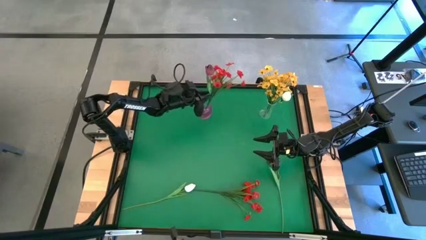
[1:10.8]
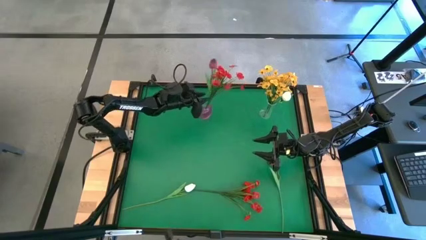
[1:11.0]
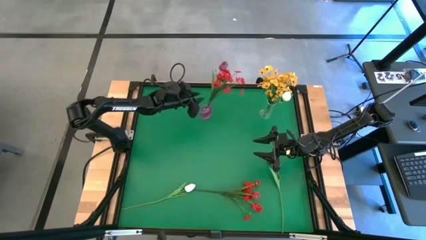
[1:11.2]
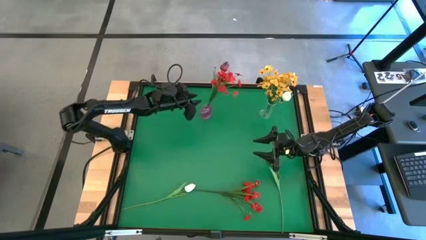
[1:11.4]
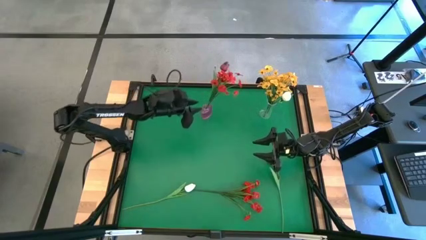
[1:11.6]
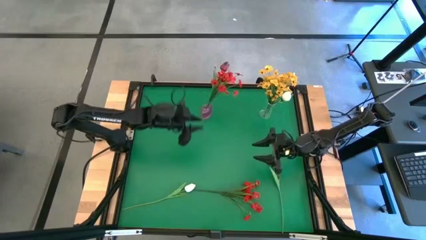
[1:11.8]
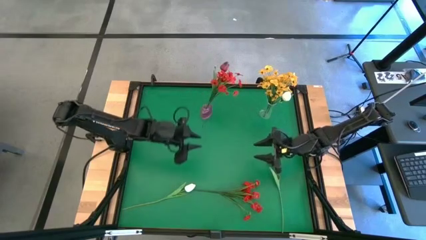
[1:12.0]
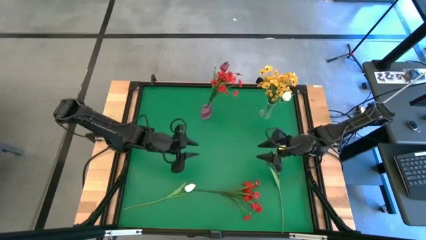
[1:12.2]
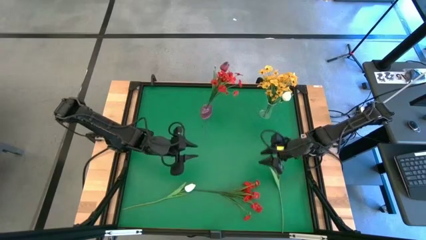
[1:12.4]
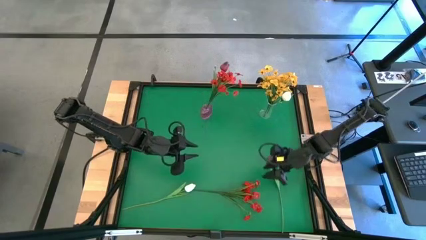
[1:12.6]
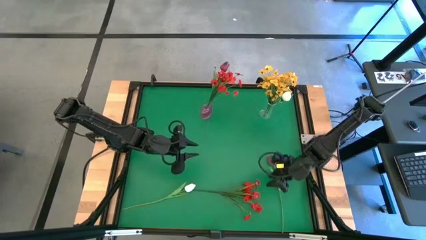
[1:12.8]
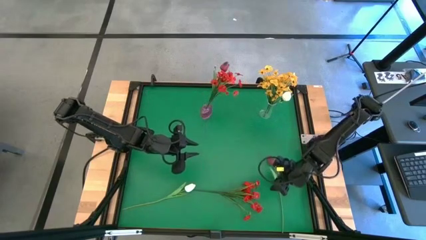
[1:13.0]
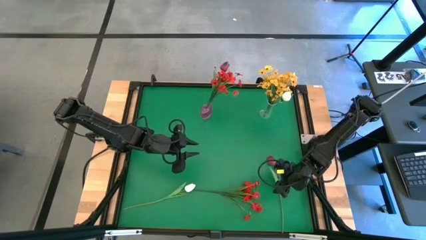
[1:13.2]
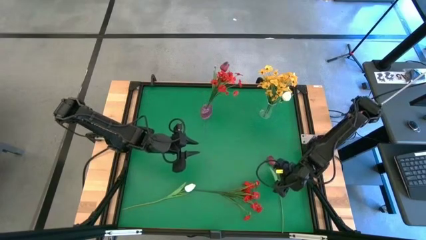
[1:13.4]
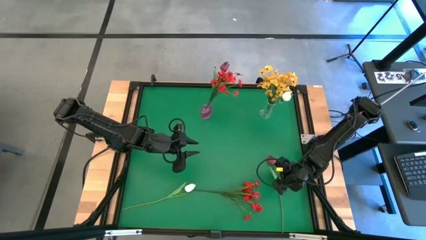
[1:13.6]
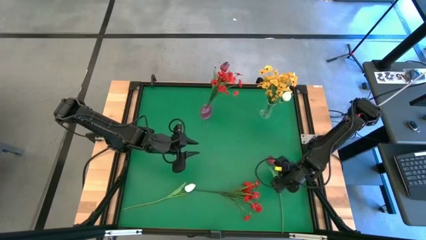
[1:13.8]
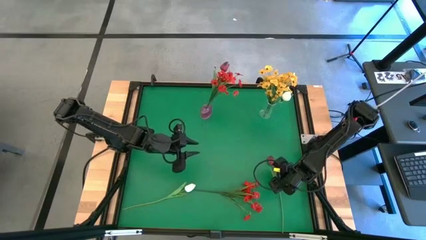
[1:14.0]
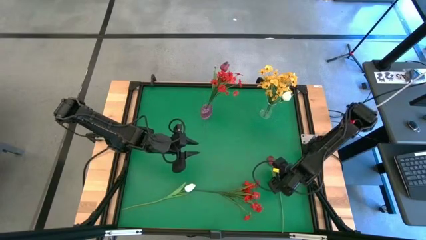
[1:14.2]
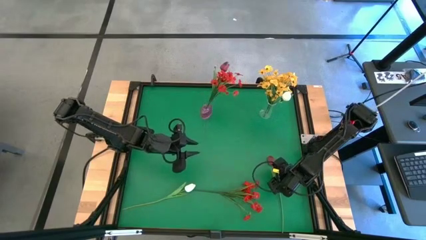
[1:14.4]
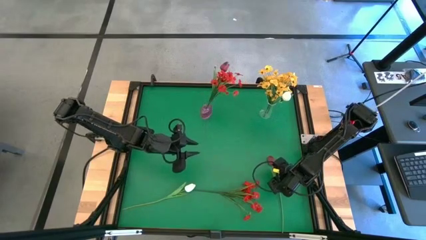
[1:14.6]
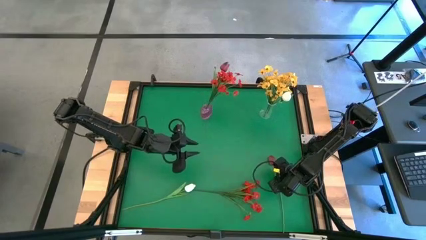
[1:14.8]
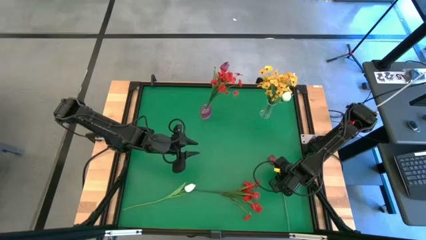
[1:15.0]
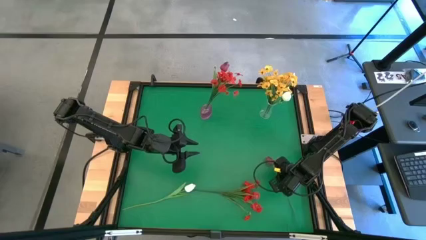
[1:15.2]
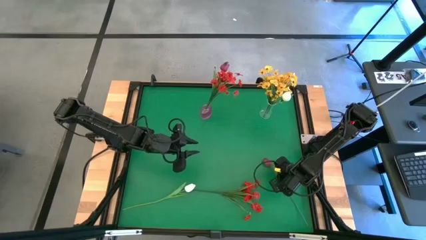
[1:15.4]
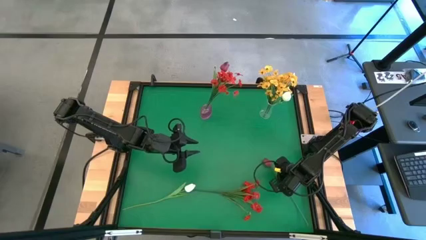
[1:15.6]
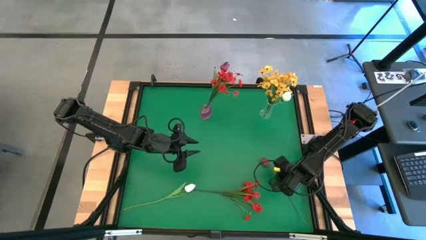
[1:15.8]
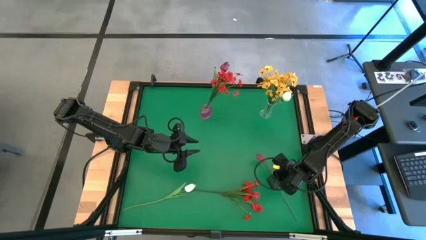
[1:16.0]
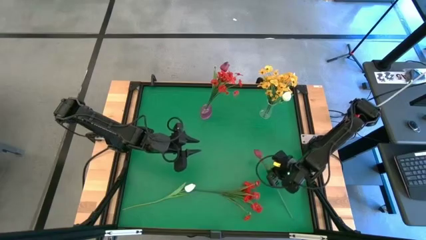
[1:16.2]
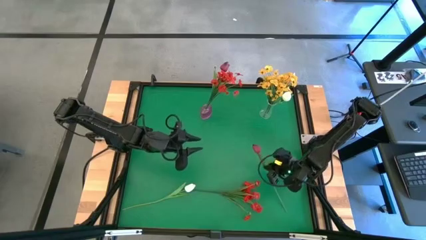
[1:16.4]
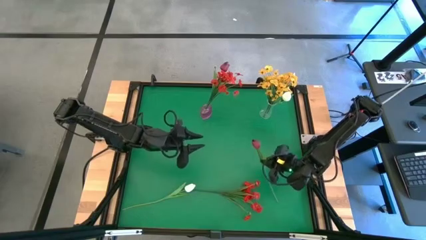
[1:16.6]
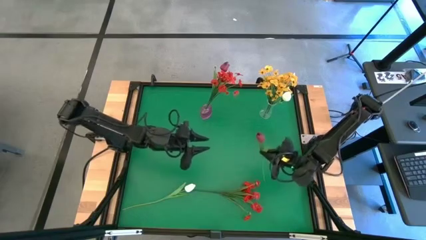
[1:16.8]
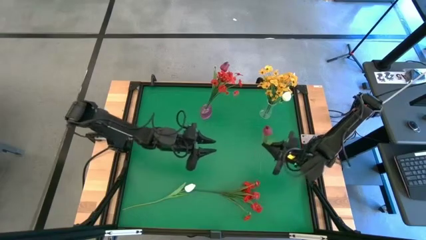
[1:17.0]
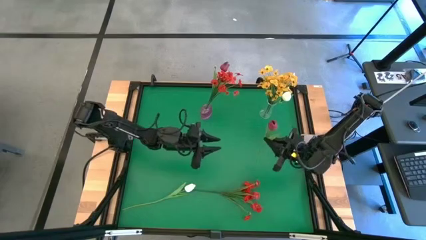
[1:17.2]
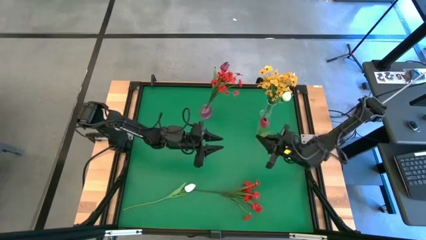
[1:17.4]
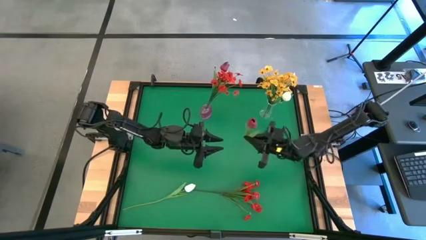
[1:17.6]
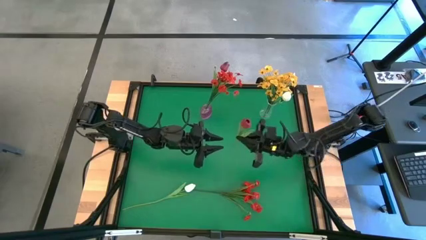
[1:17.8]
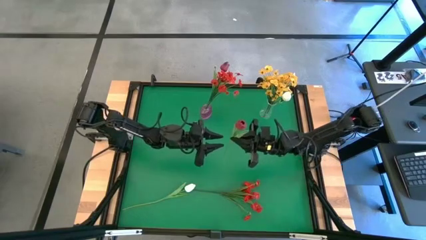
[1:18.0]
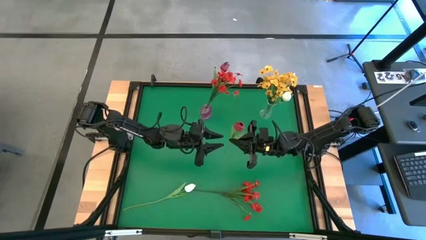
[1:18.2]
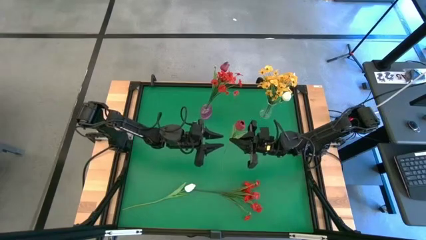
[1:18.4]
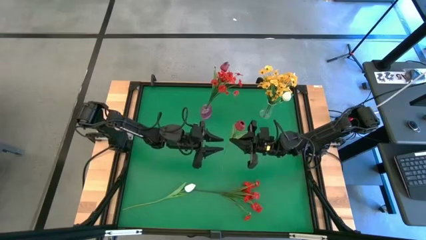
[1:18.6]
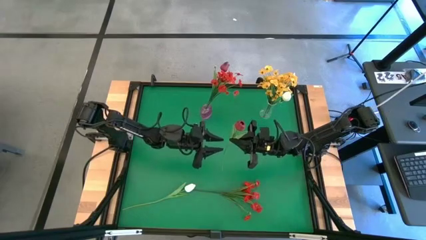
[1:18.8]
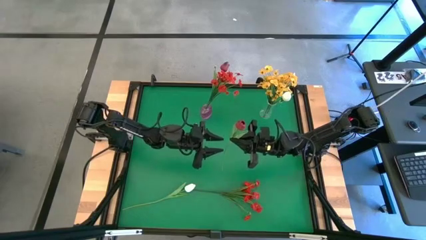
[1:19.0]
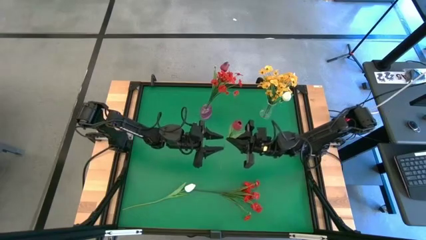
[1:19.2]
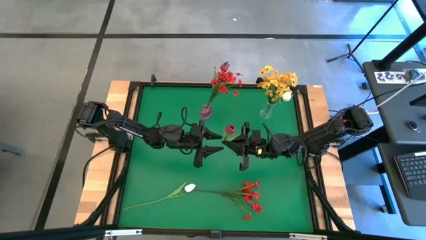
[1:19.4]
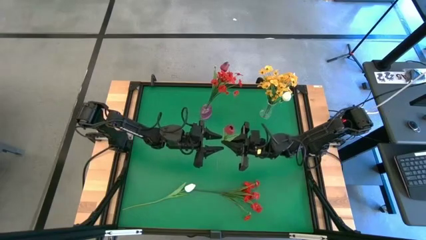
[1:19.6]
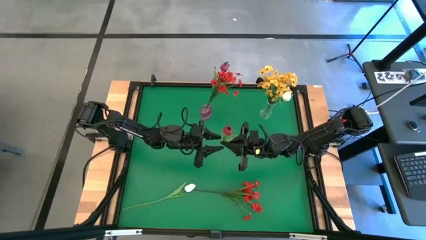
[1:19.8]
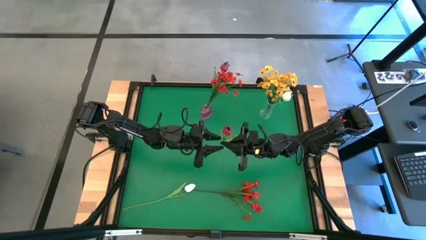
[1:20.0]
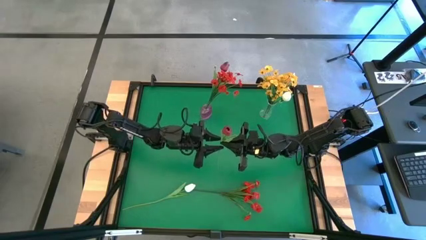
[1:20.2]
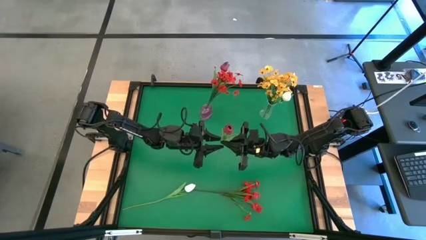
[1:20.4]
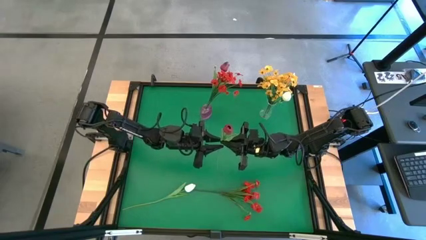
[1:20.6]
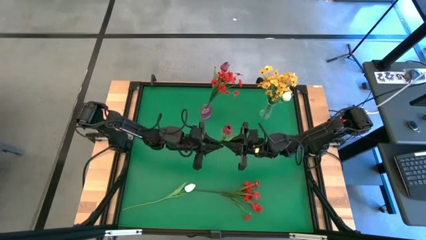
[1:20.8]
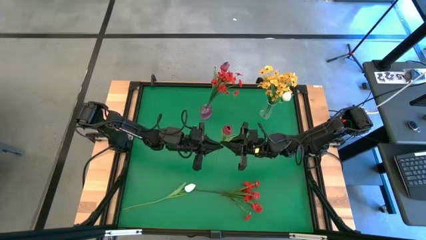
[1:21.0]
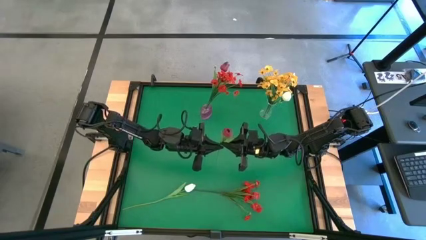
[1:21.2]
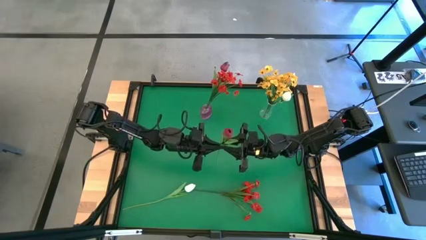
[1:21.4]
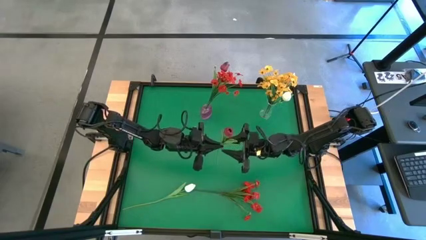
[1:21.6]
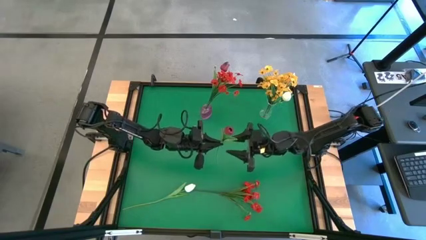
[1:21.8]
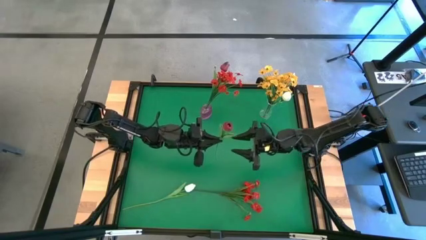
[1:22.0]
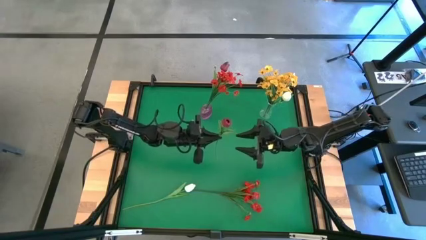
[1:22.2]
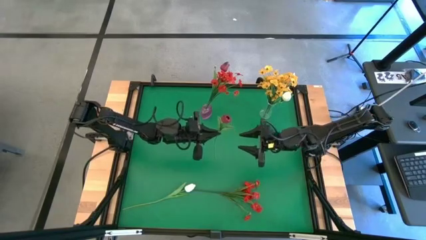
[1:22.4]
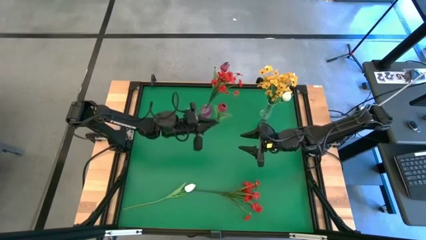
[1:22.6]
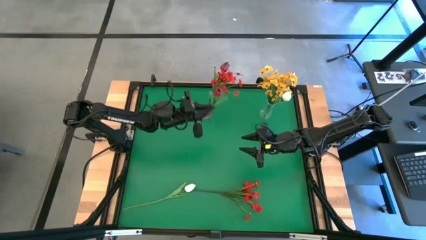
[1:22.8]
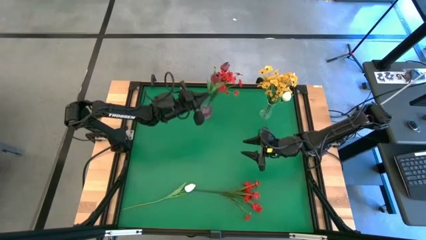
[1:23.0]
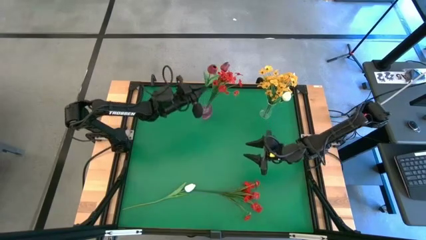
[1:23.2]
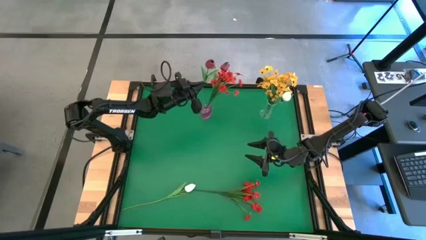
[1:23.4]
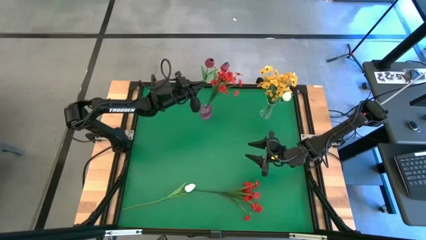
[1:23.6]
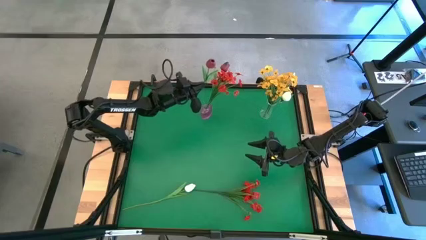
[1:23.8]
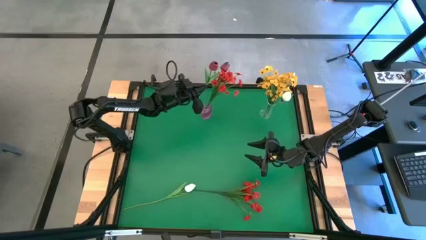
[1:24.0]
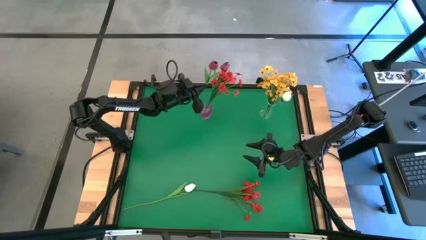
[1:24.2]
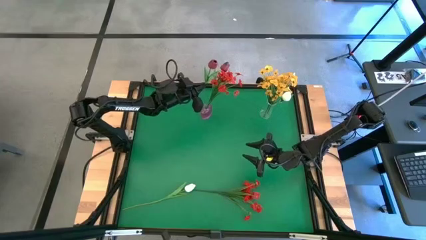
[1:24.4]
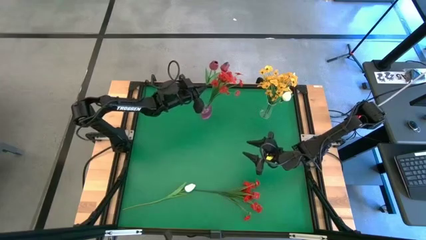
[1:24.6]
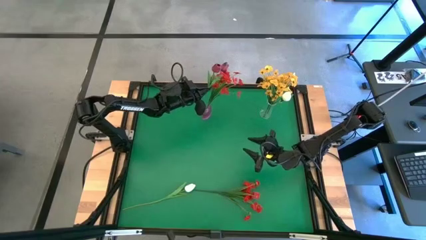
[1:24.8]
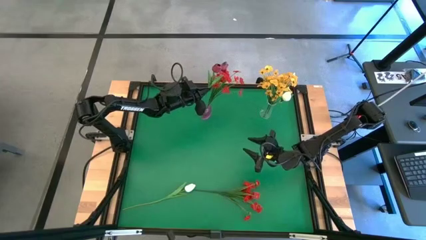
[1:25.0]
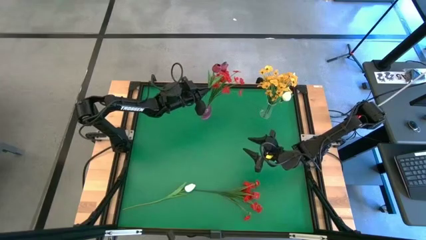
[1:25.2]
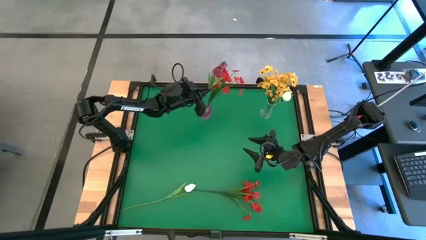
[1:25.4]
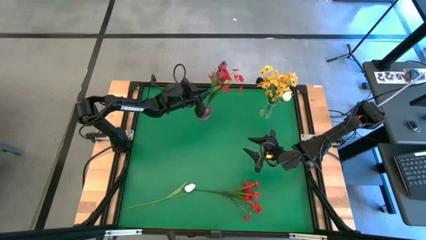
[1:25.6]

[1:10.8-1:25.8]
Task: Sort flowers into vase by color
Put the pink flower into the pink vase
